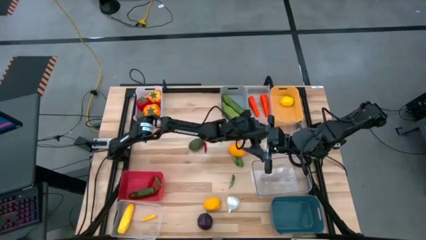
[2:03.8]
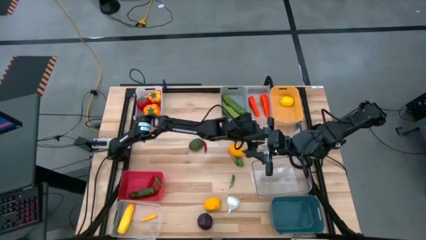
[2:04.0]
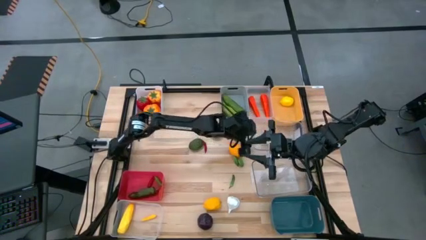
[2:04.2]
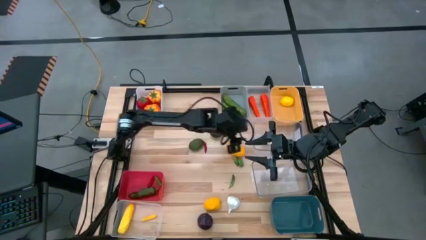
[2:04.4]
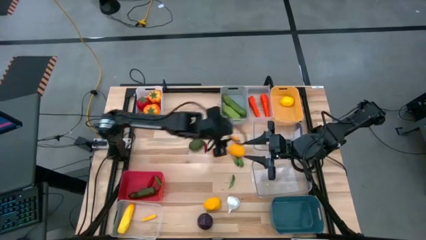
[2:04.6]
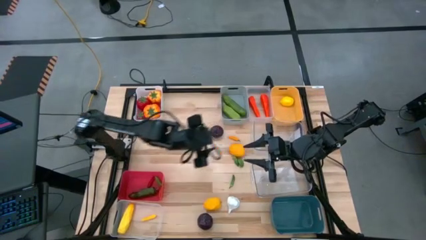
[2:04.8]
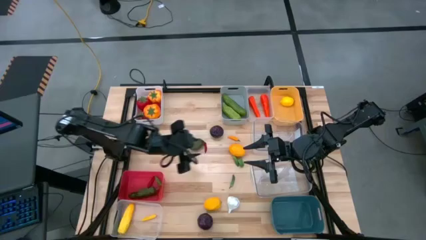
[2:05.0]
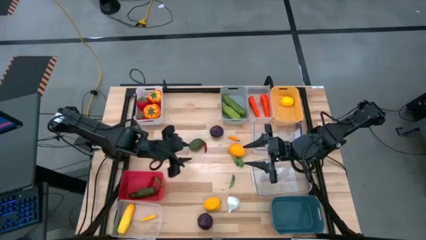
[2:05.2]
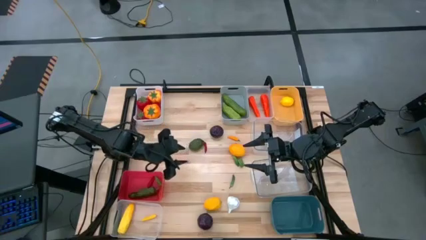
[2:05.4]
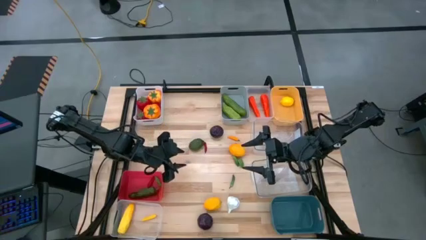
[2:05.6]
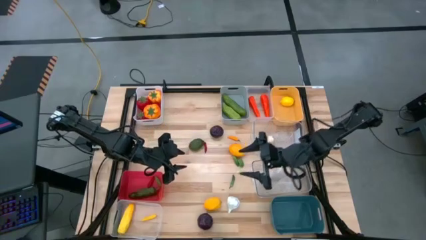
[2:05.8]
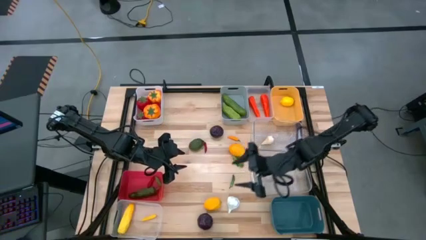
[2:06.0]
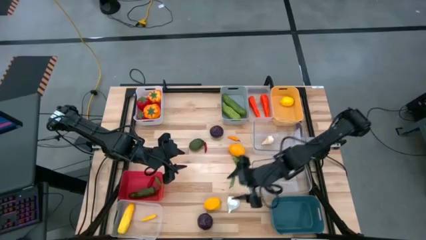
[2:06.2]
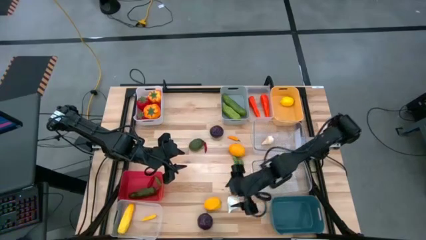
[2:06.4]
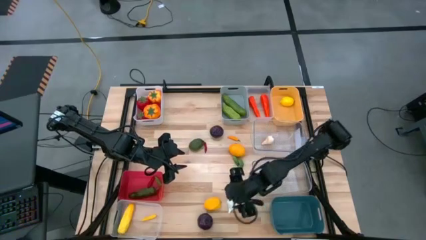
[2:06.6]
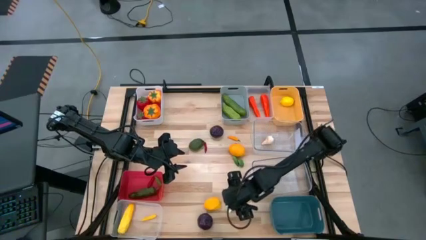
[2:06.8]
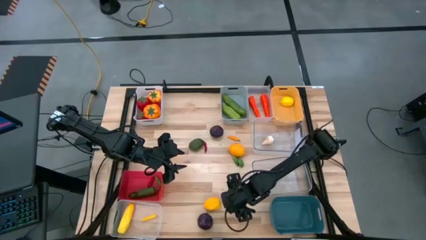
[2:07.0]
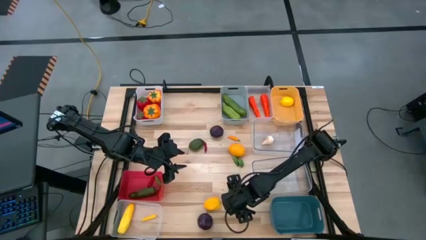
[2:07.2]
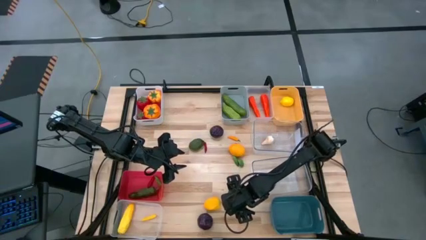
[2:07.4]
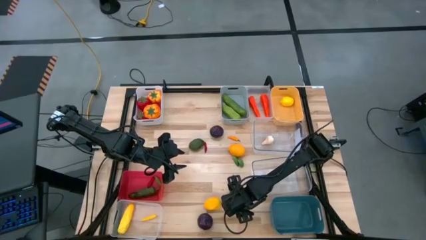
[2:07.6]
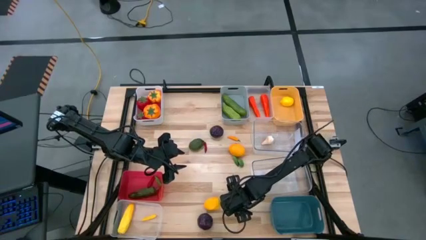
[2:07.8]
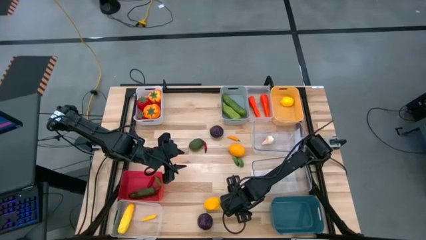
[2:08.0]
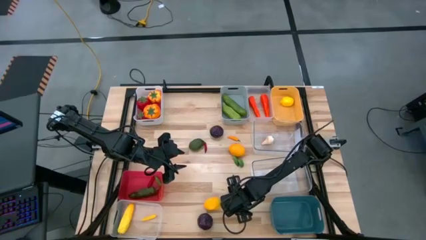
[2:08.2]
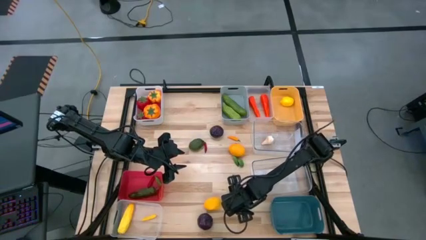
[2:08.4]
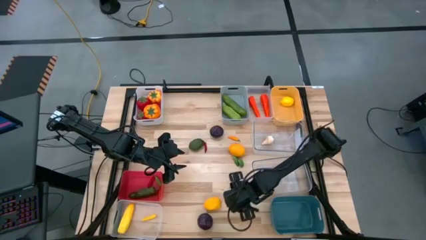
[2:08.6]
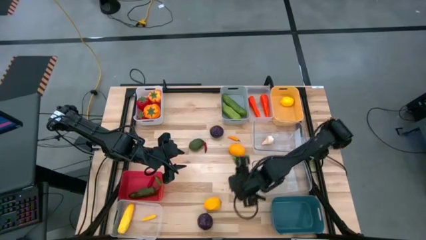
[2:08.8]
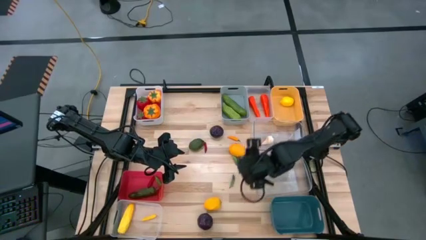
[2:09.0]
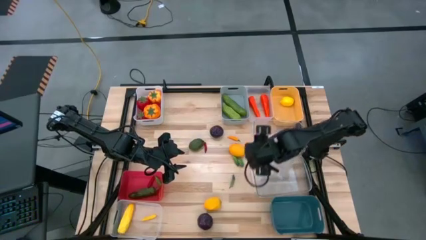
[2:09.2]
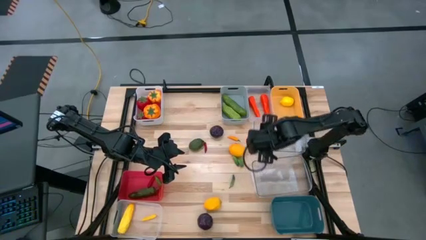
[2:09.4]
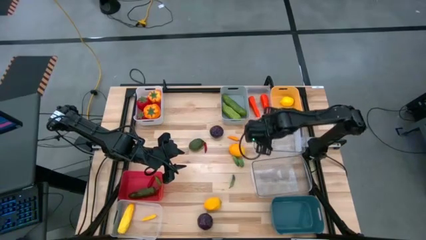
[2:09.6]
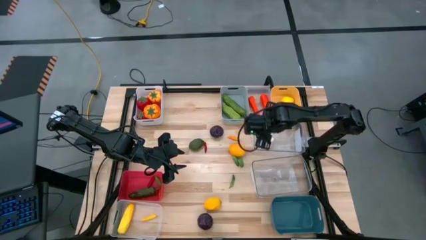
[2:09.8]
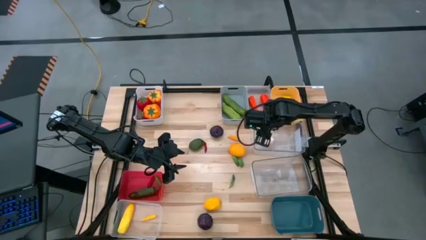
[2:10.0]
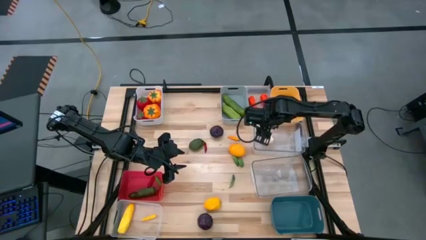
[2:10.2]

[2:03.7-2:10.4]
Task: Sort produce into baskets
Put the garlic into the top transparent bin

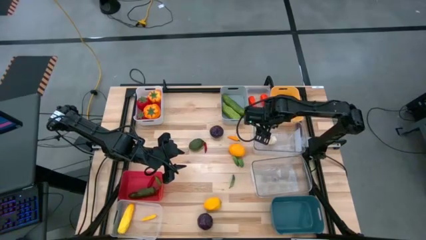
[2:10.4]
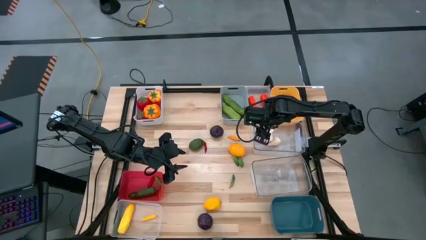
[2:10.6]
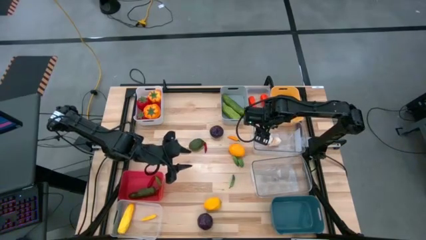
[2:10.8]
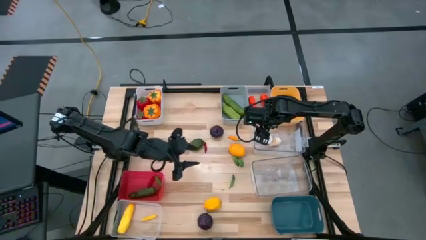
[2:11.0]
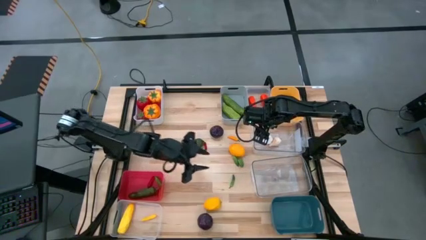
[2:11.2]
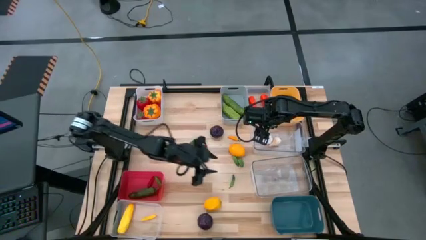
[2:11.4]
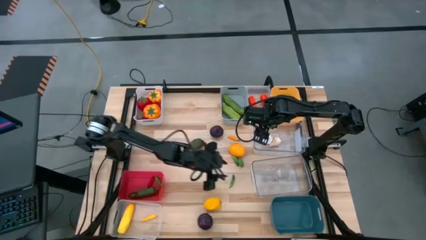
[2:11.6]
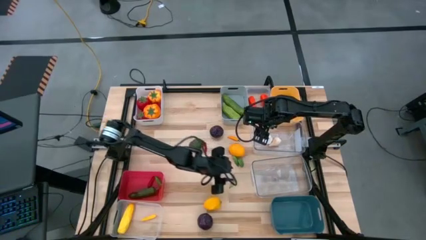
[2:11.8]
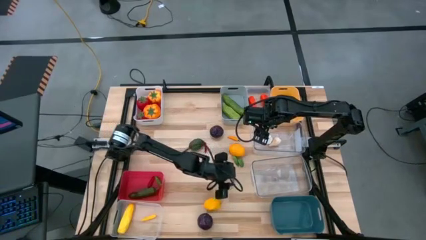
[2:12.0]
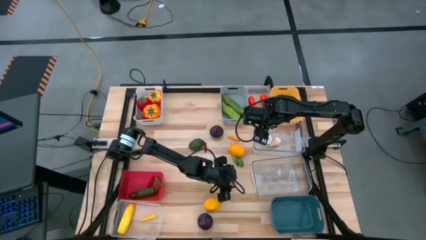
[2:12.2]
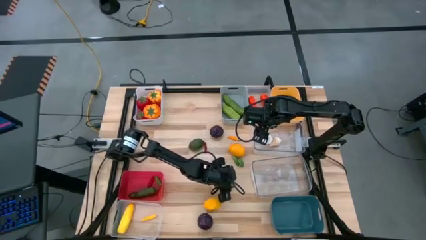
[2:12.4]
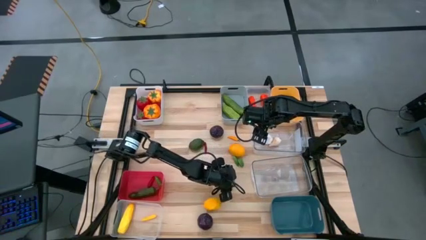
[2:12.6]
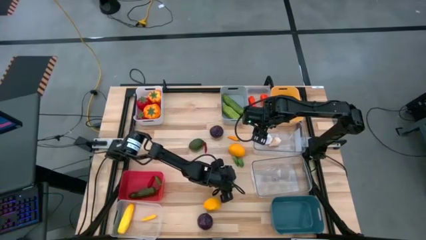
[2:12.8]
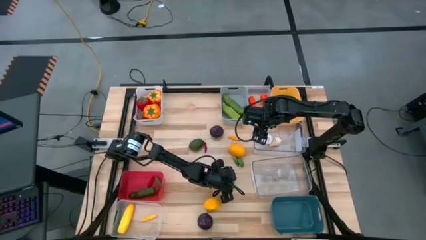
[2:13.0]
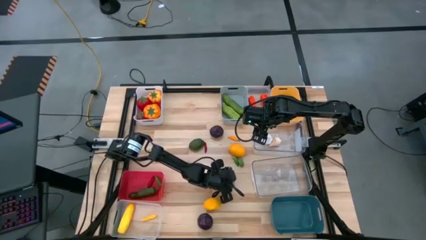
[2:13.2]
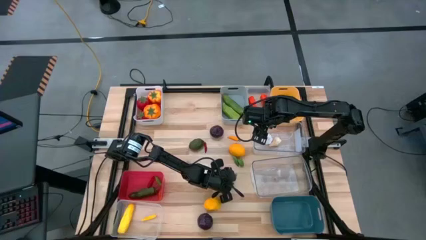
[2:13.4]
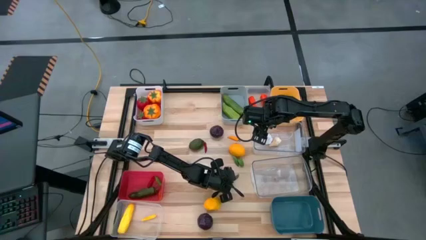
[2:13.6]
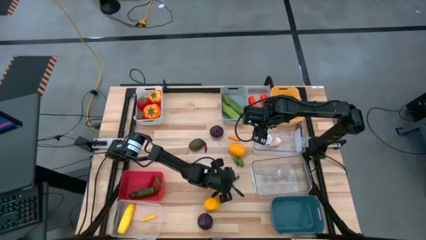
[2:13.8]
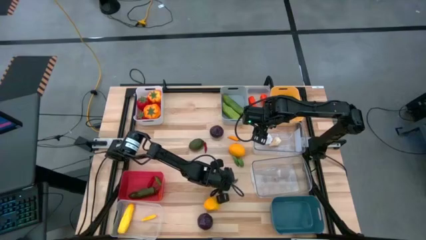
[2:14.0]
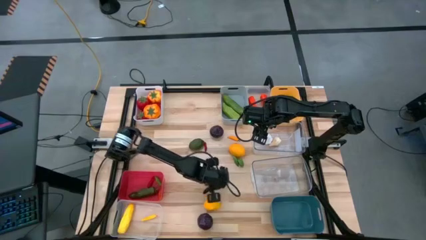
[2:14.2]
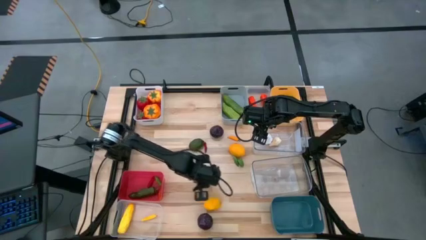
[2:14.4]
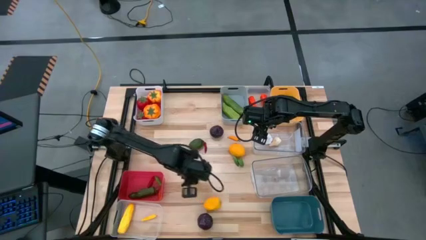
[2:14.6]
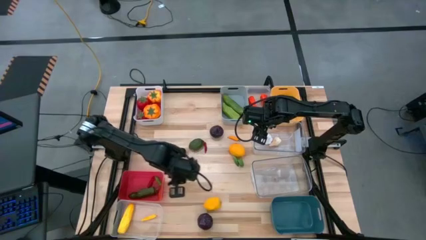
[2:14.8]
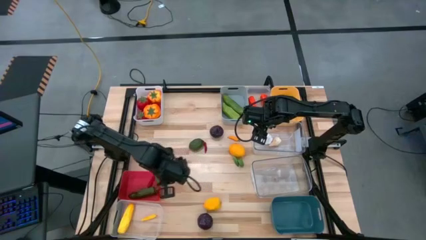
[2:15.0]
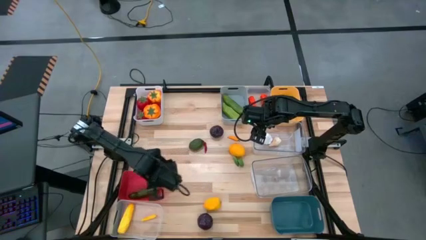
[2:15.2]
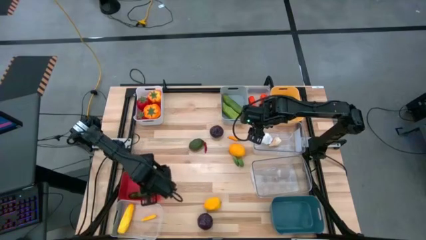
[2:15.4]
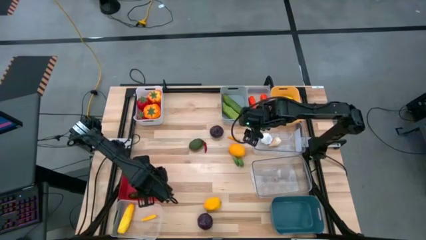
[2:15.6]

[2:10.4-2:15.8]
Put the bottom green chili pepper into the red bin

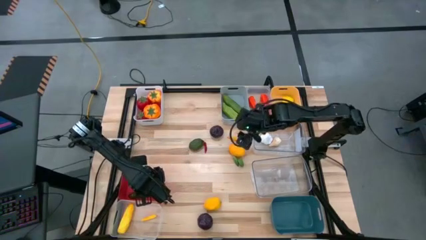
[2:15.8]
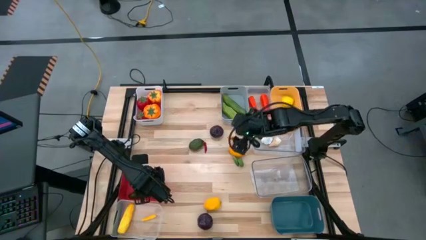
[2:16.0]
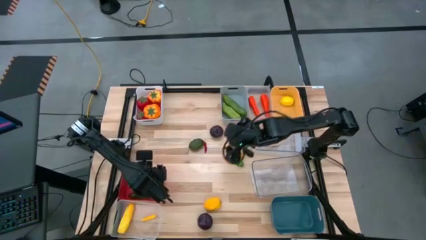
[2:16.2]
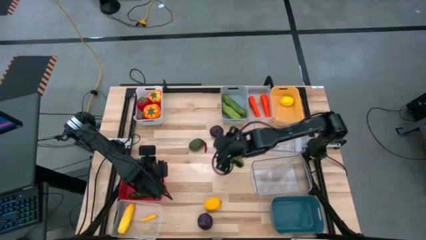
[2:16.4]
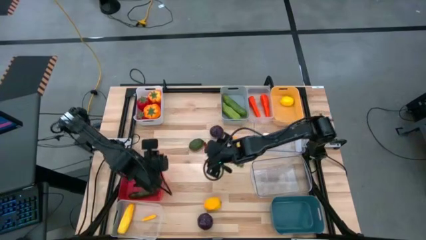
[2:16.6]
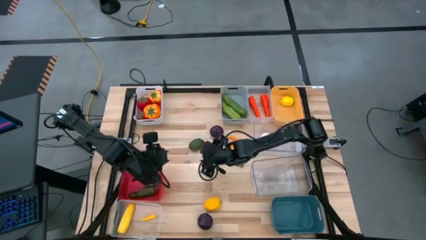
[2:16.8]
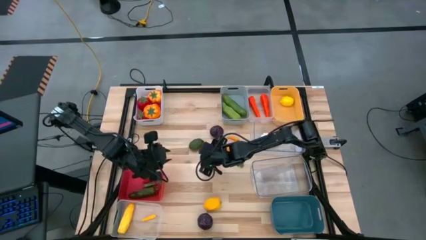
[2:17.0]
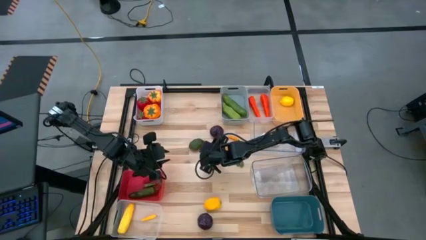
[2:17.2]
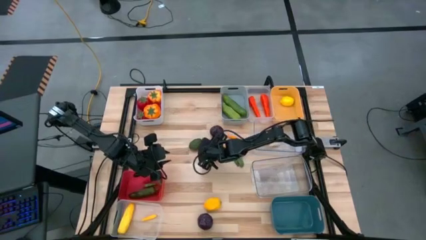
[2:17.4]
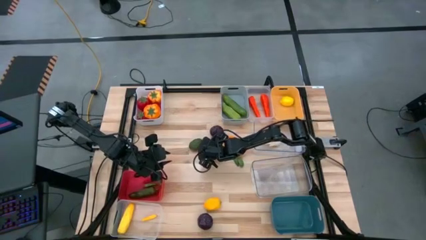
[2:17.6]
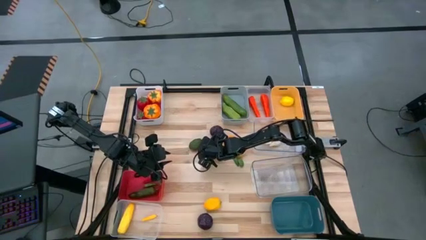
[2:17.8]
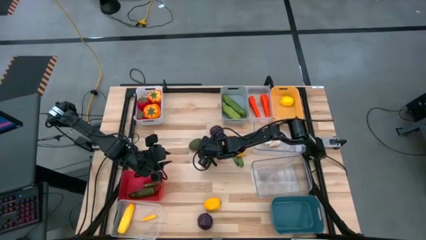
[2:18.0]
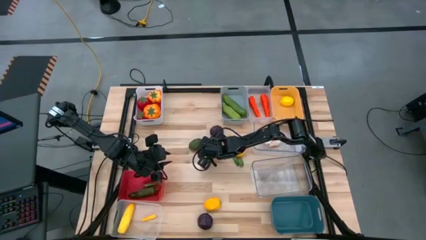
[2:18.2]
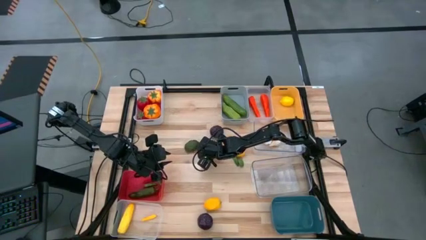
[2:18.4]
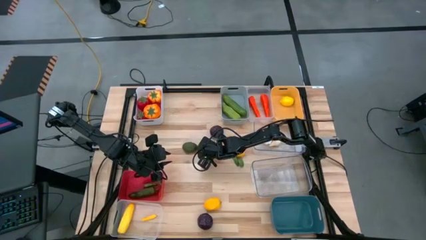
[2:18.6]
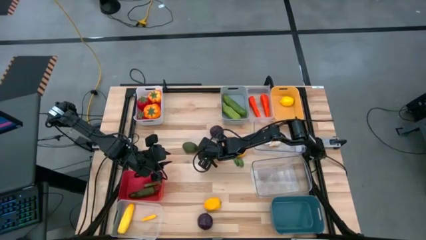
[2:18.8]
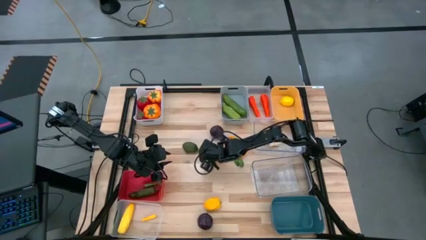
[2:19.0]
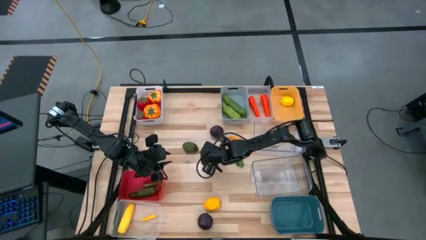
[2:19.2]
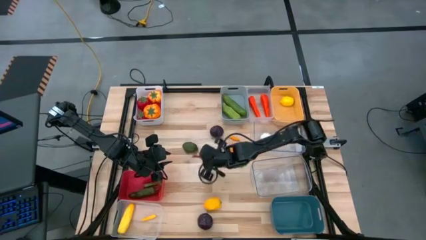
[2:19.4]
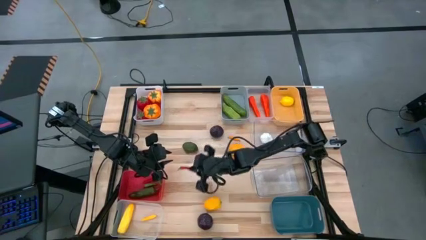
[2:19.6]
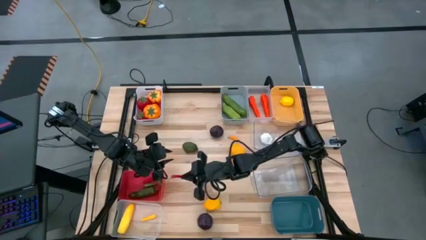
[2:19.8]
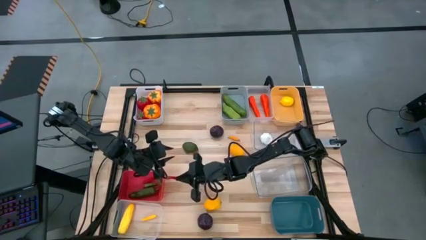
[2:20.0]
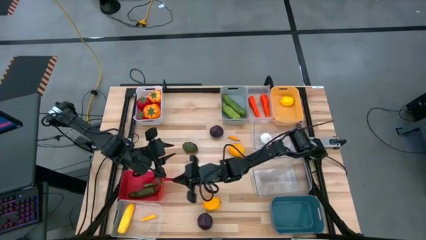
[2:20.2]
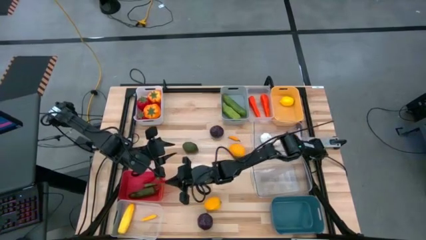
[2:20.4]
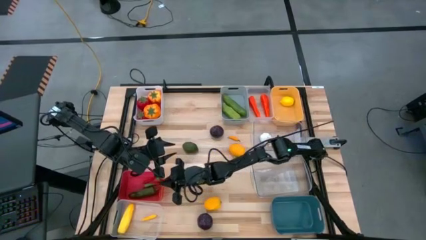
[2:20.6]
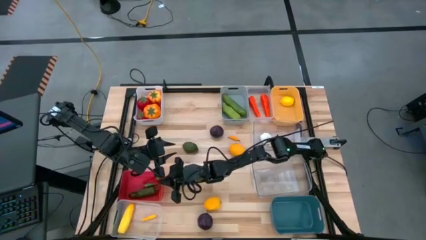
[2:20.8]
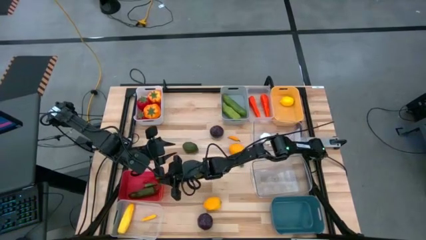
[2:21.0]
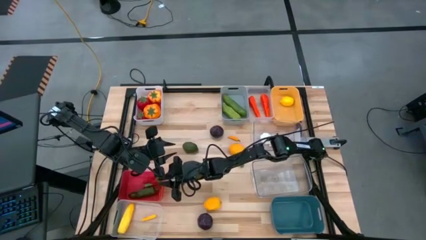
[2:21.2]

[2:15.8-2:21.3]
Put the red chili pepper into the red bin
